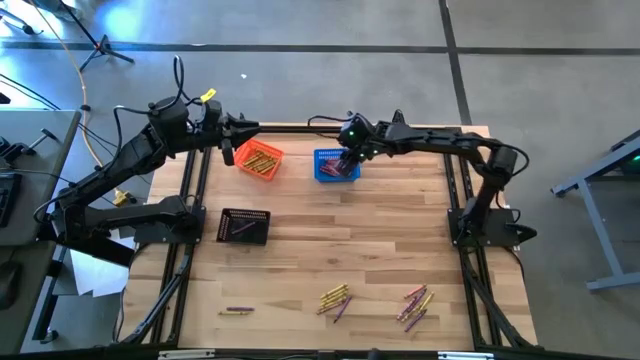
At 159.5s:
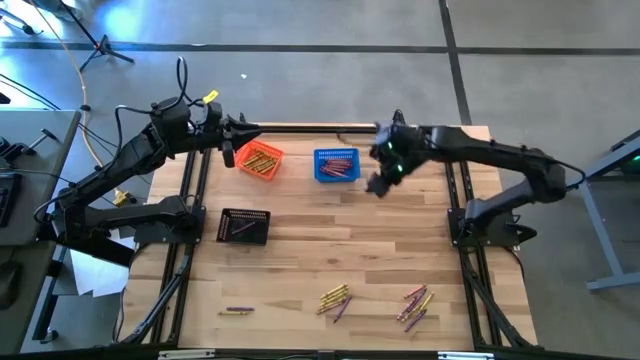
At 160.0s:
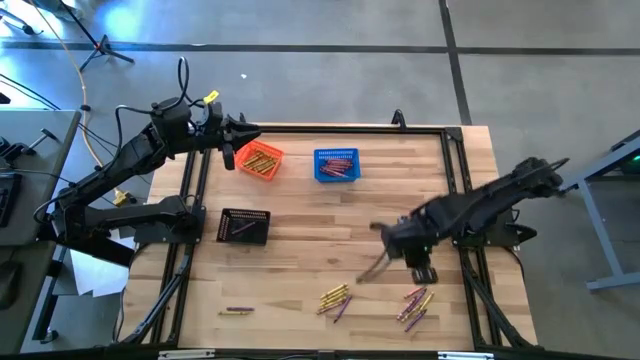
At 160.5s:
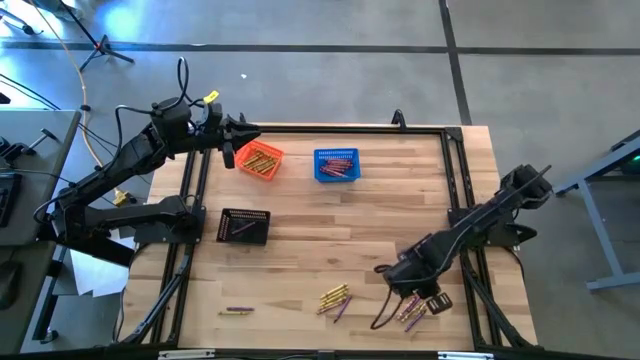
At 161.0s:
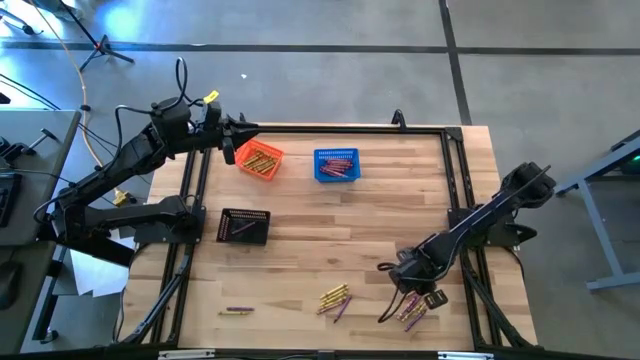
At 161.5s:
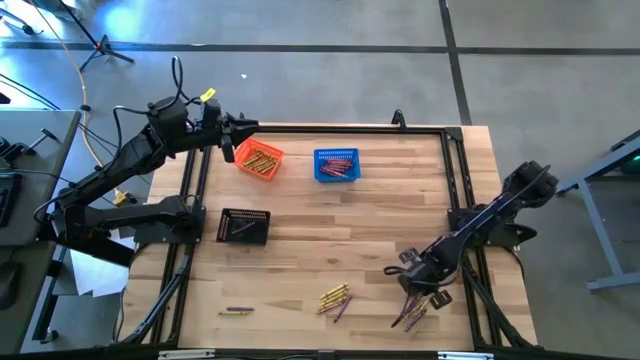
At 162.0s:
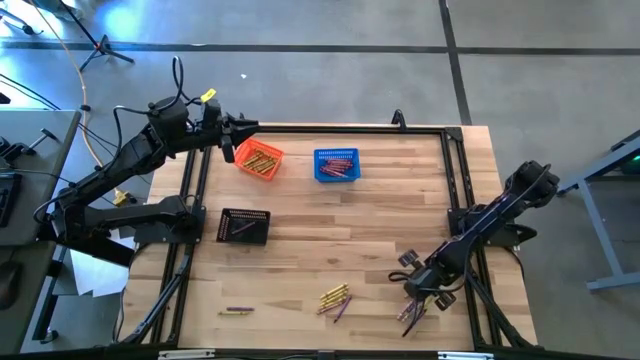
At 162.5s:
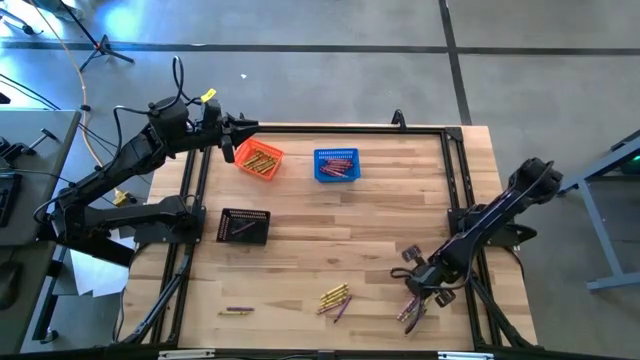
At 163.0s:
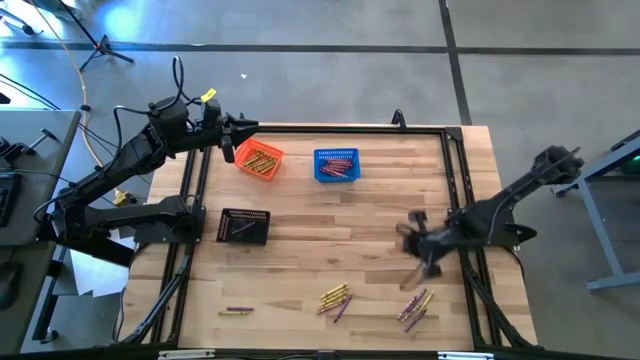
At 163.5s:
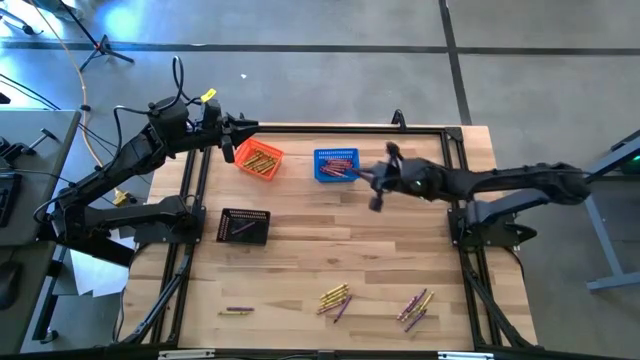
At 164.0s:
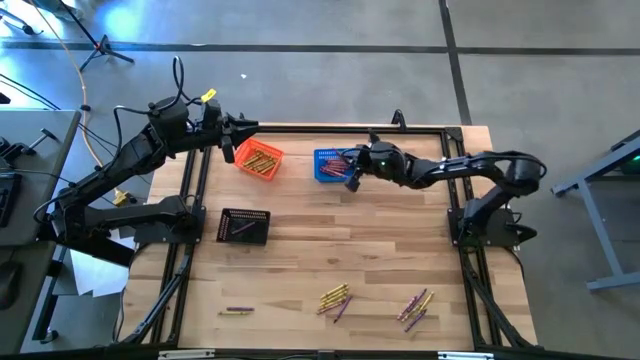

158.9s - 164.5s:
Task: Sort crayons
Put the red crayon into the blue bin

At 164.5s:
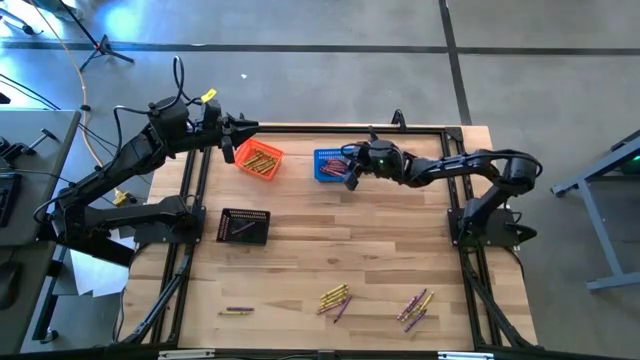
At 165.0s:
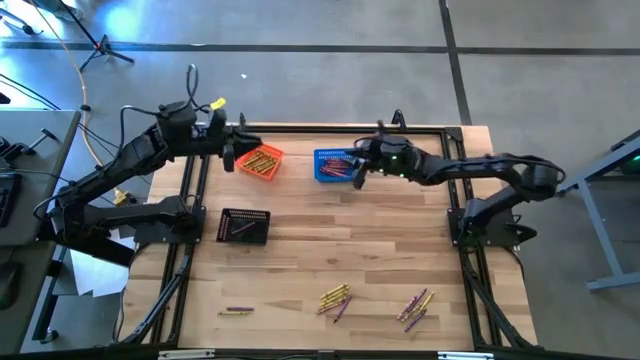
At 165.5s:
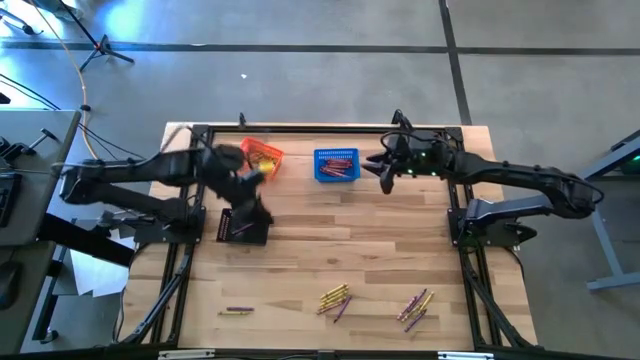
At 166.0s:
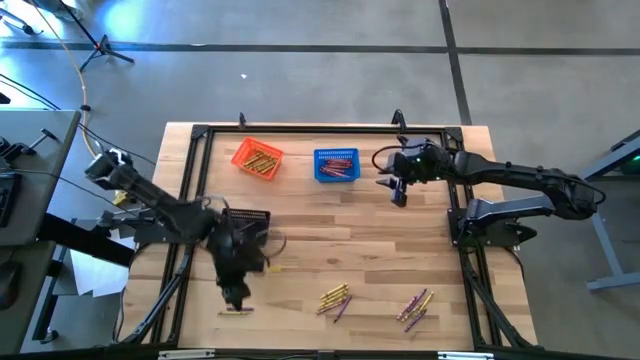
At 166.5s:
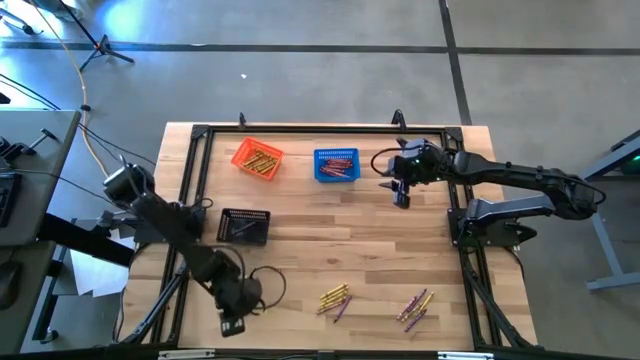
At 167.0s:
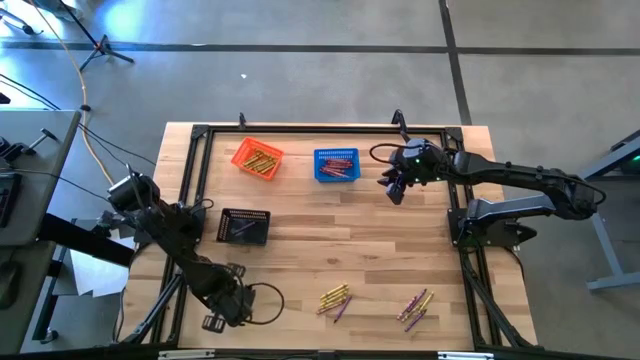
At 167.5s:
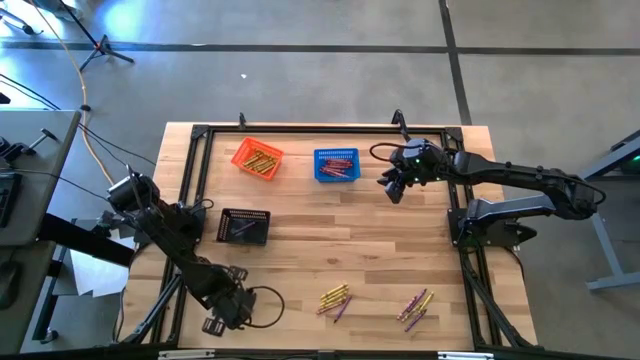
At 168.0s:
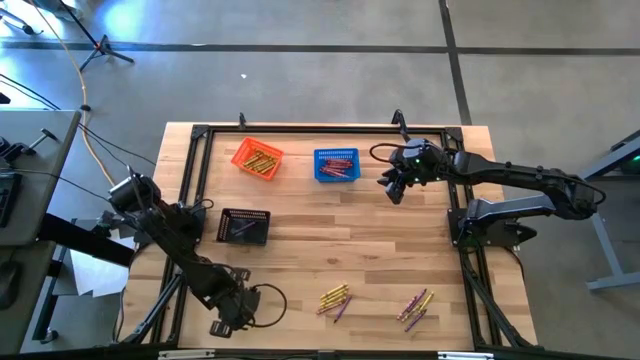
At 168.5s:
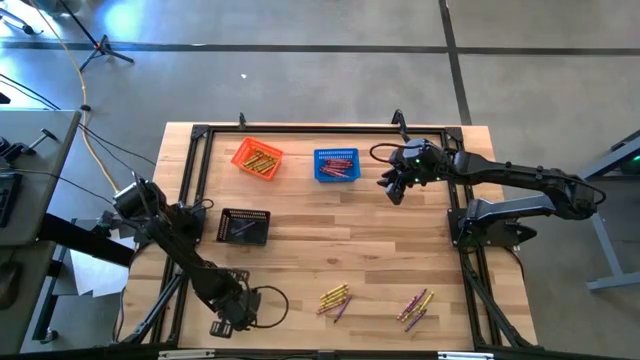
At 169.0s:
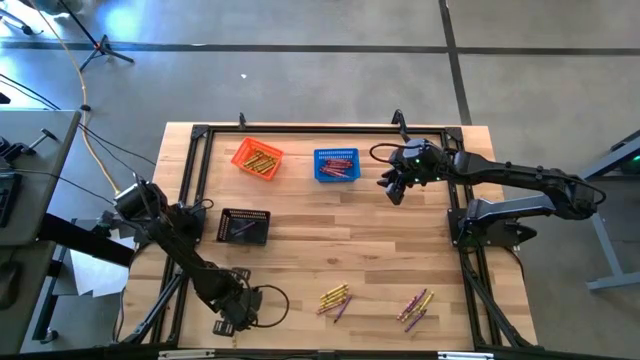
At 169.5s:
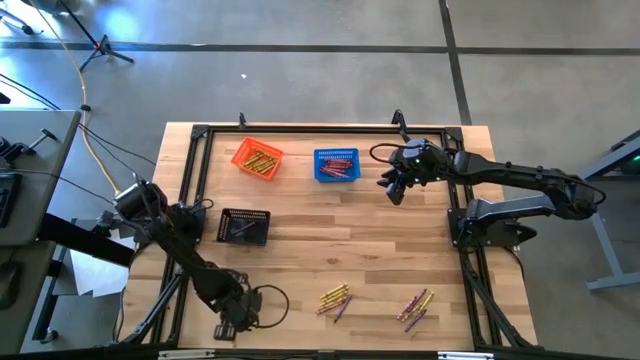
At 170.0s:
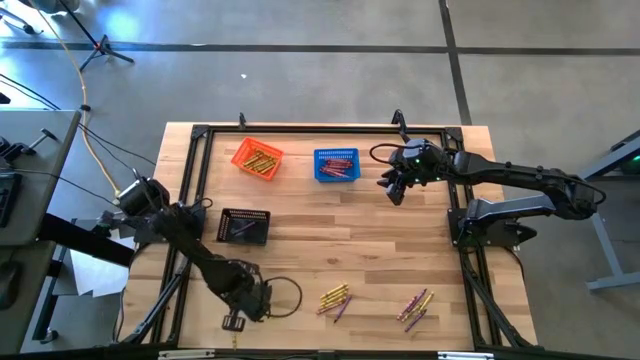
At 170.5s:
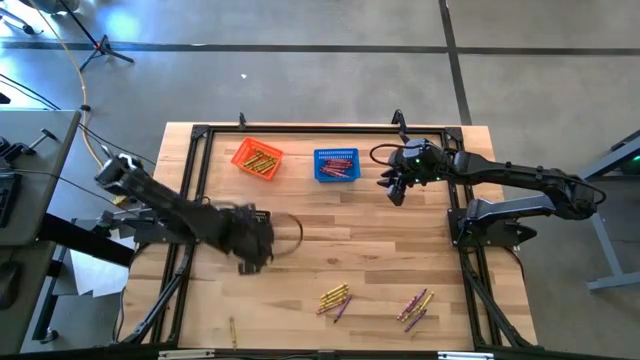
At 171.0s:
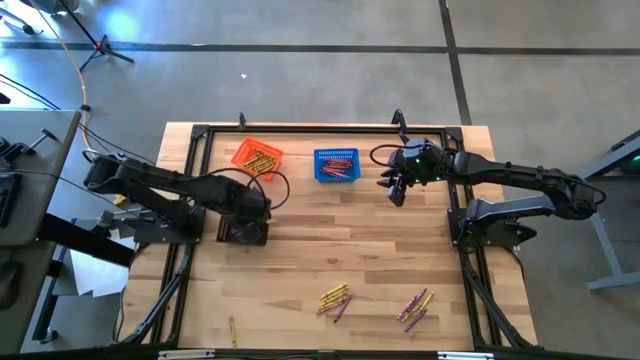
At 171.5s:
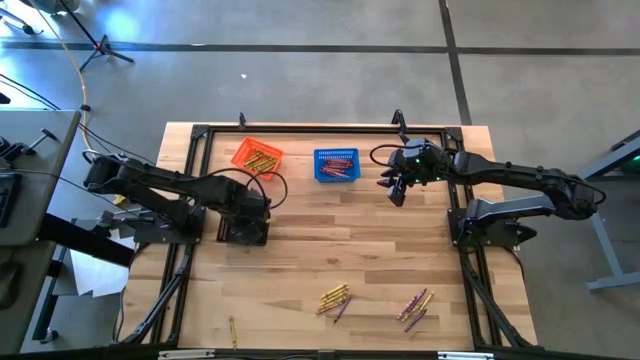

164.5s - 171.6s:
Put the violet crayon into the black bin

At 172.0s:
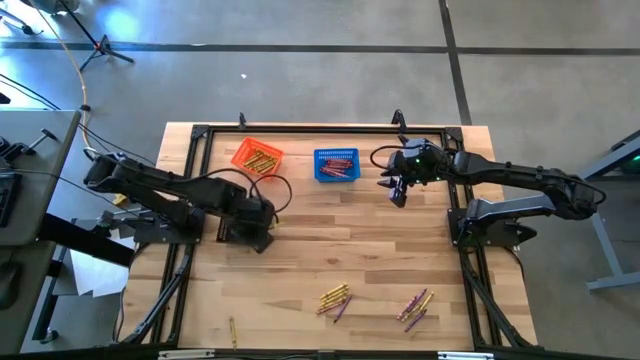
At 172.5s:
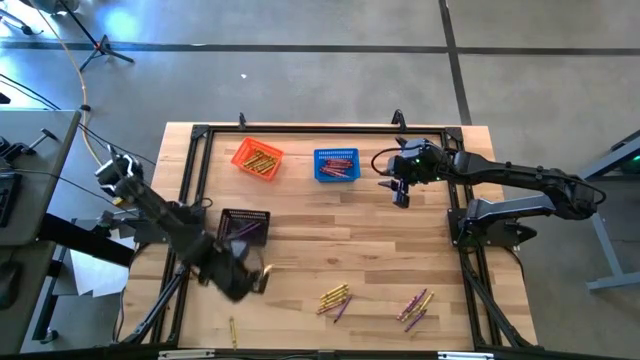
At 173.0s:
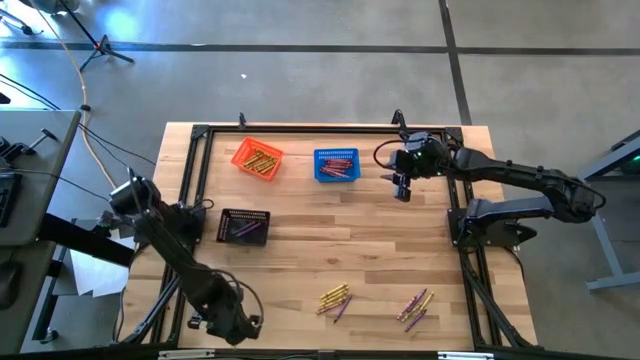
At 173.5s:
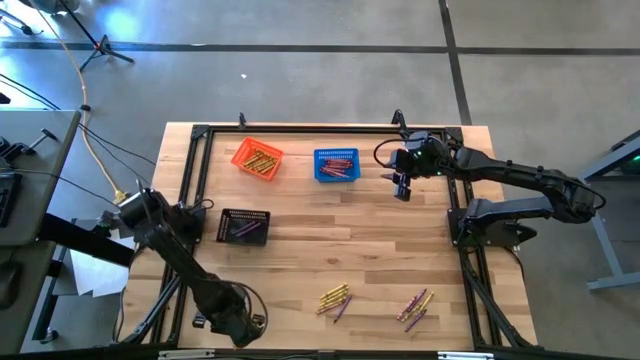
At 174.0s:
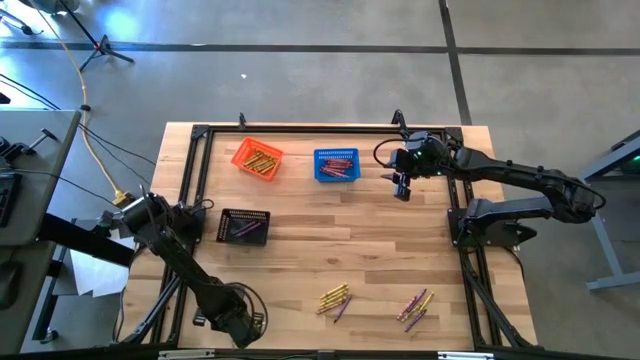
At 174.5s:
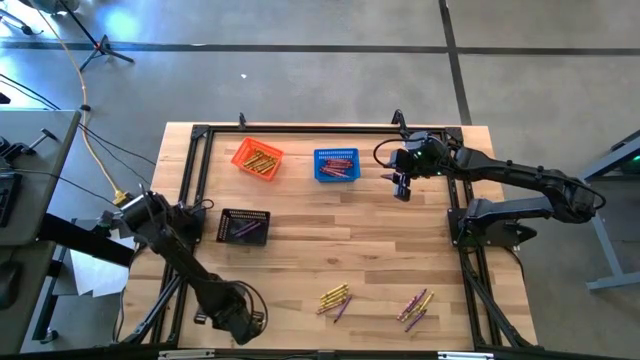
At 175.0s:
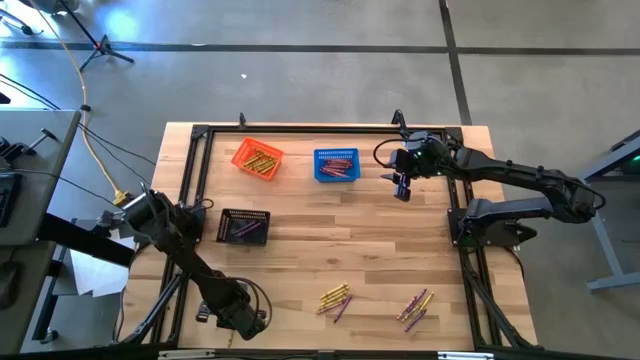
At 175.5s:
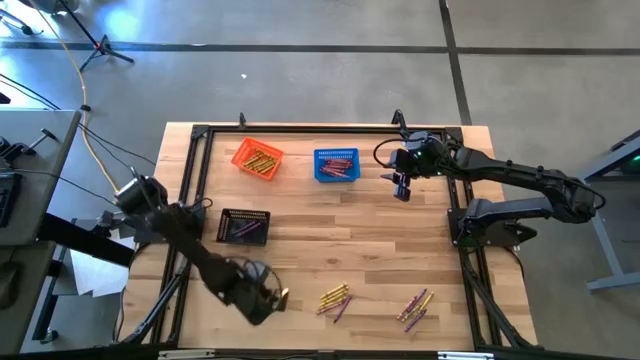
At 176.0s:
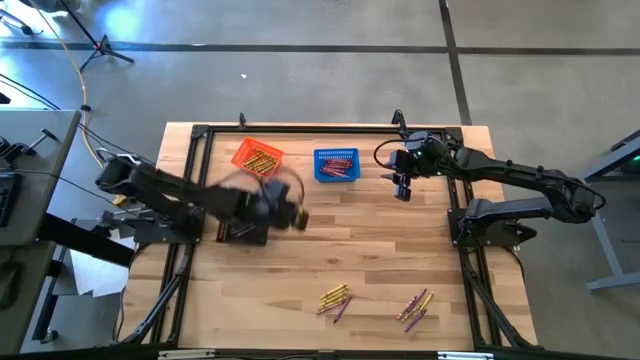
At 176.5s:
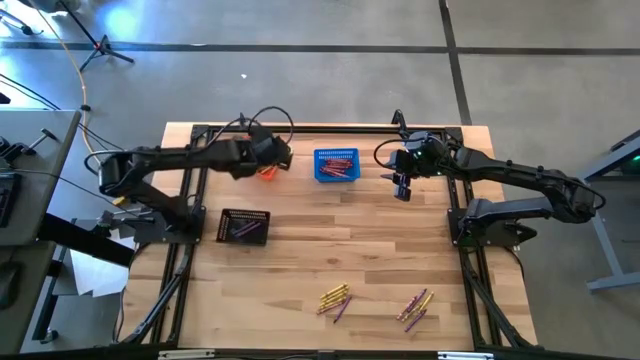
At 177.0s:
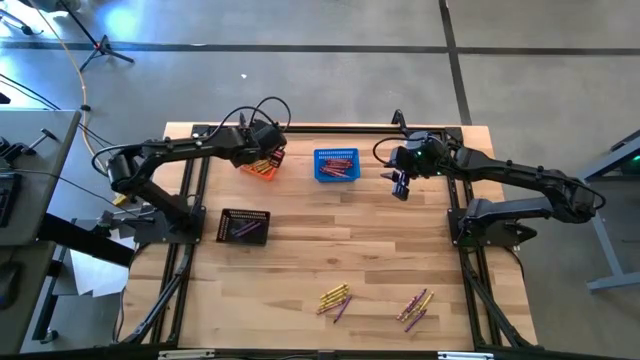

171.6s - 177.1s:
Put the yellow crayon into the orange bin

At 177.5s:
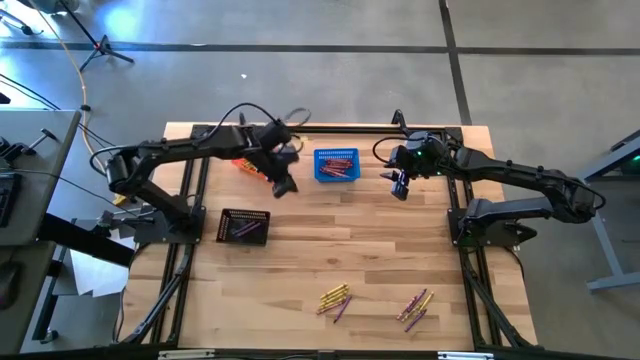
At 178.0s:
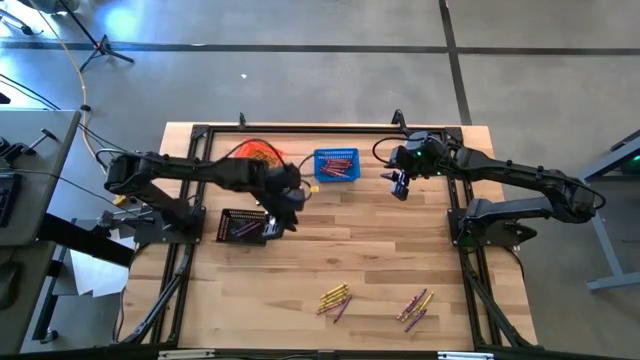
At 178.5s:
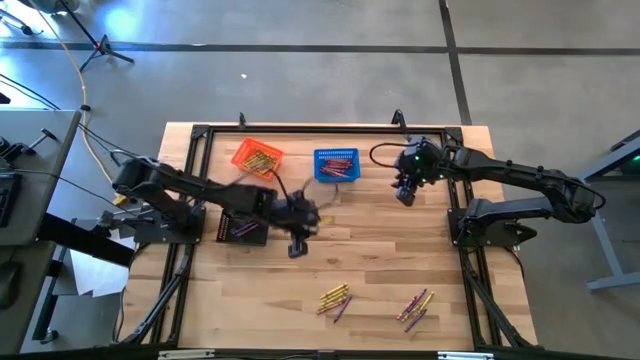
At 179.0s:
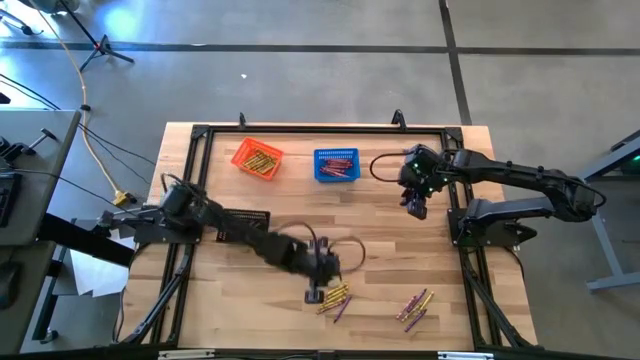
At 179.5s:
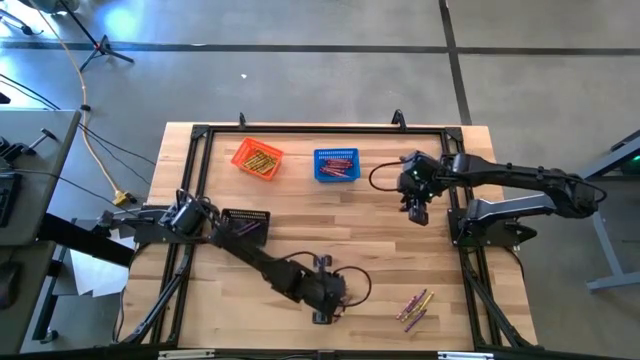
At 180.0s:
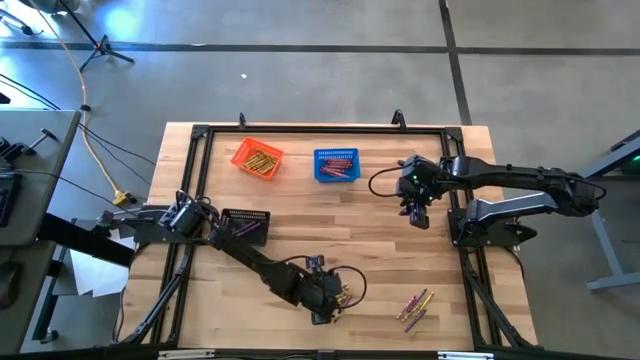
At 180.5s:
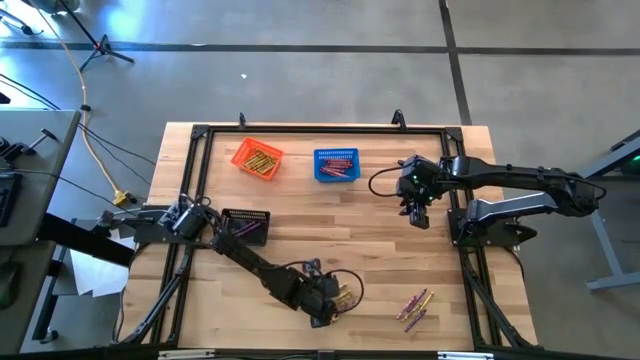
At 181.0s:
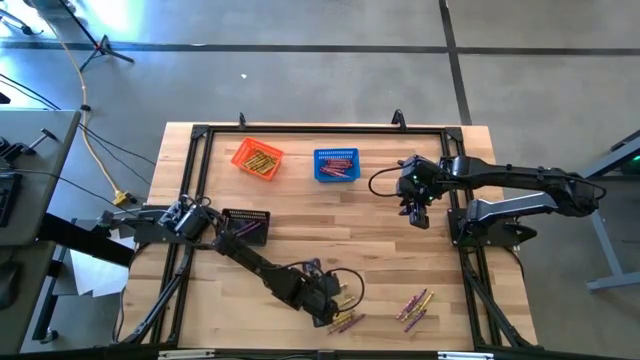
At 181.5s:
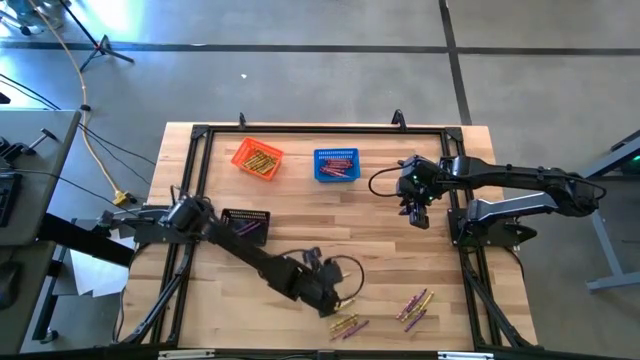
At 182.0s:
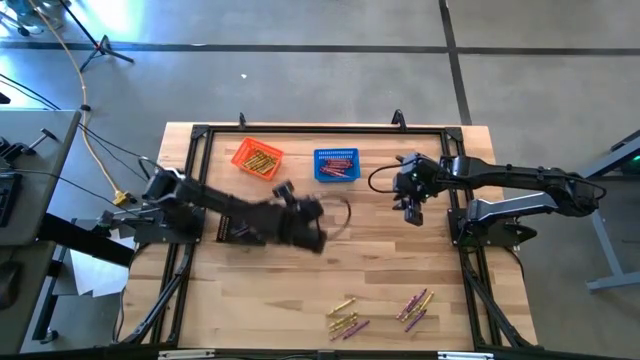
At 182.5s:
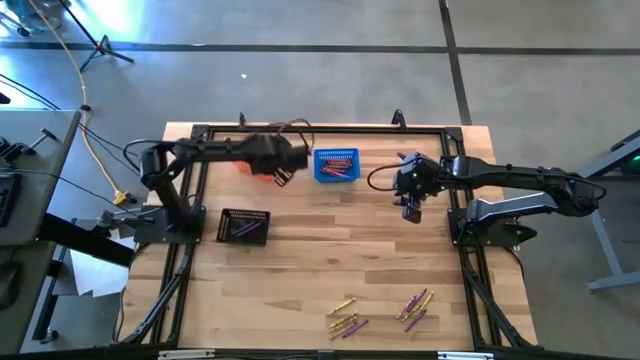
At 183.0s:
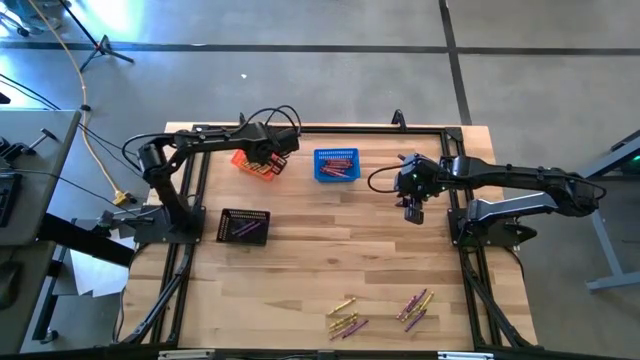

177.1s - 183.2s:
Put the yellow crayon into the orange bin
